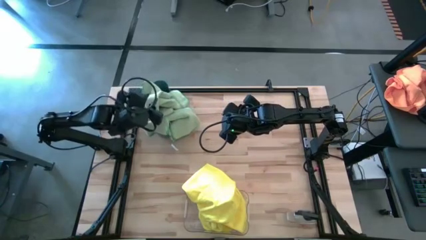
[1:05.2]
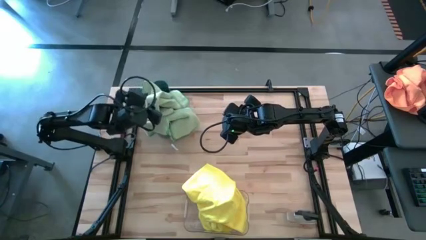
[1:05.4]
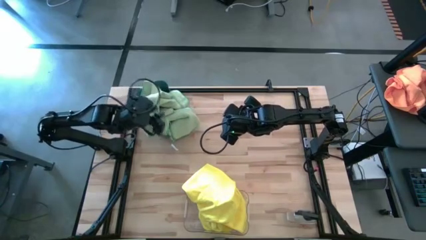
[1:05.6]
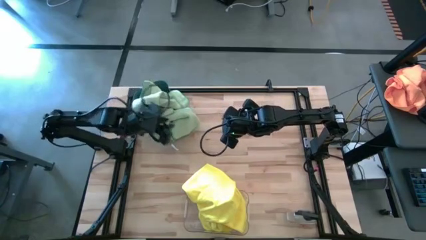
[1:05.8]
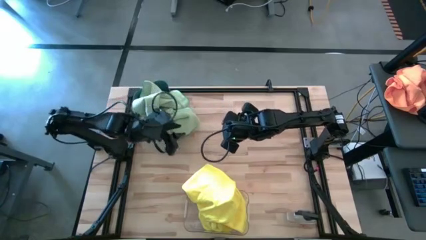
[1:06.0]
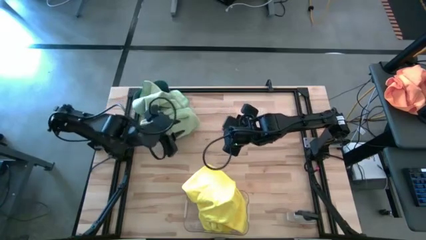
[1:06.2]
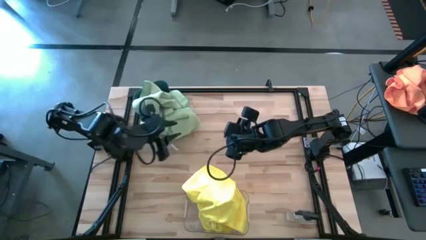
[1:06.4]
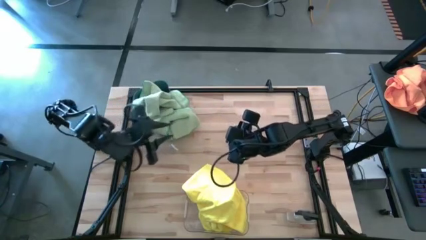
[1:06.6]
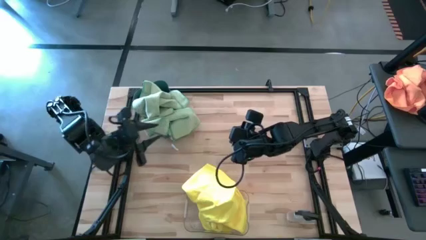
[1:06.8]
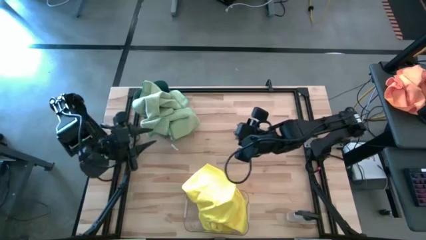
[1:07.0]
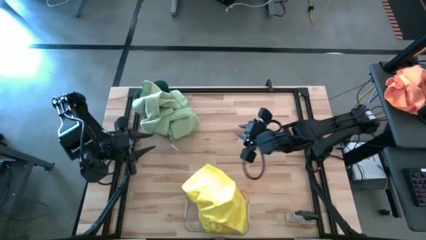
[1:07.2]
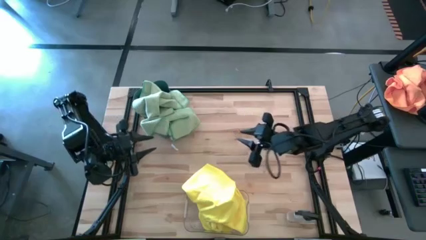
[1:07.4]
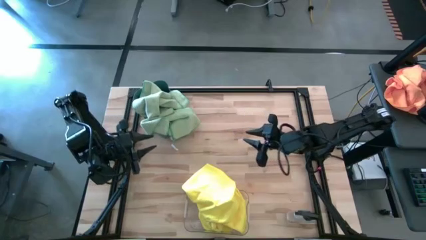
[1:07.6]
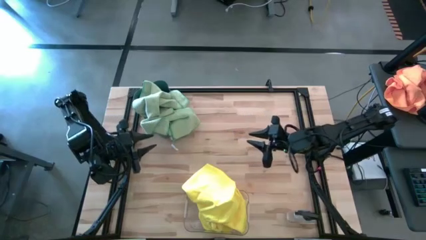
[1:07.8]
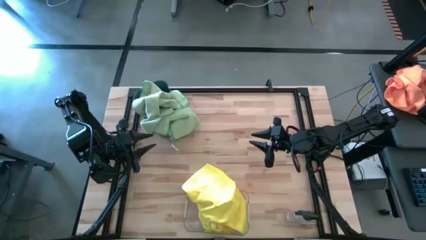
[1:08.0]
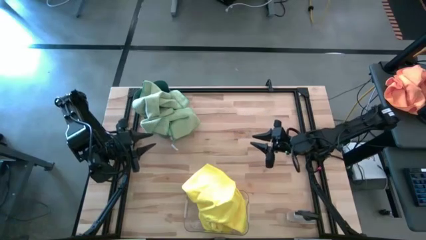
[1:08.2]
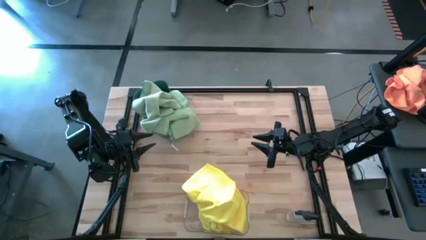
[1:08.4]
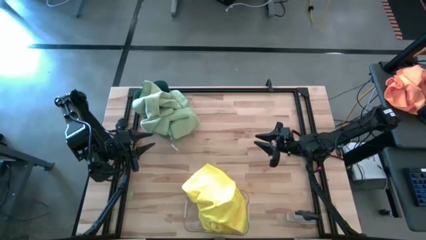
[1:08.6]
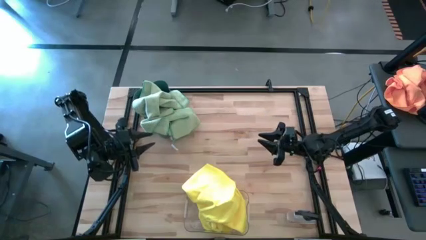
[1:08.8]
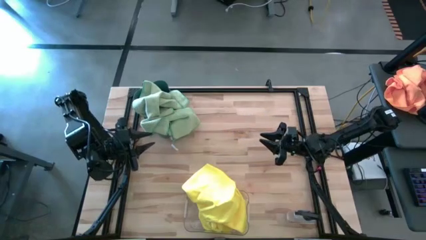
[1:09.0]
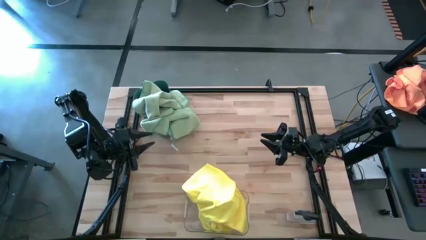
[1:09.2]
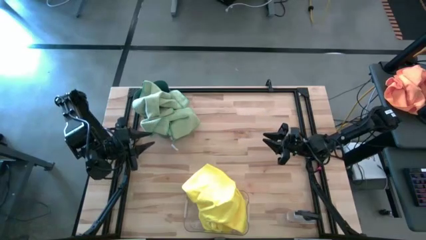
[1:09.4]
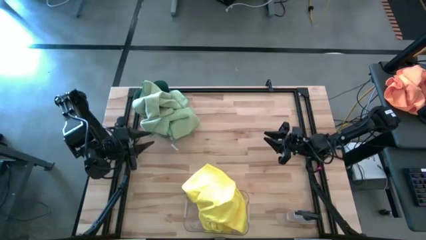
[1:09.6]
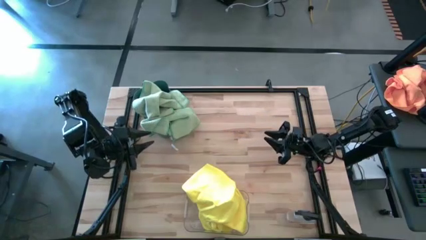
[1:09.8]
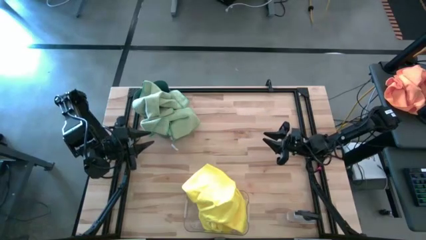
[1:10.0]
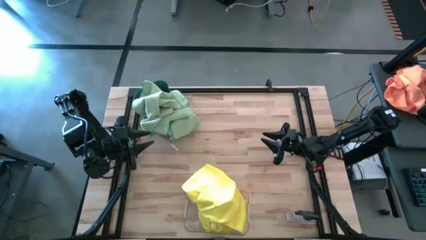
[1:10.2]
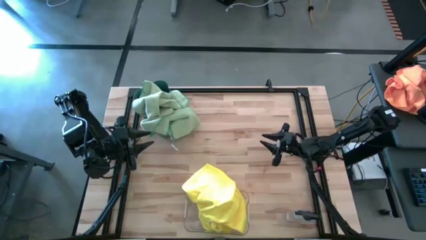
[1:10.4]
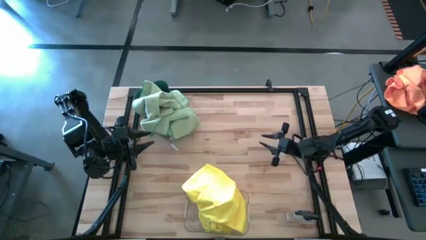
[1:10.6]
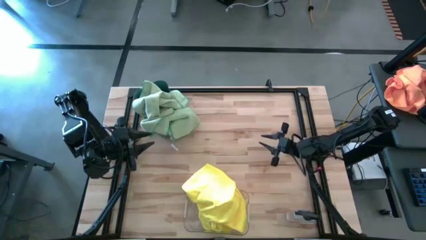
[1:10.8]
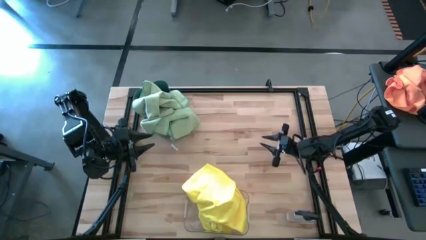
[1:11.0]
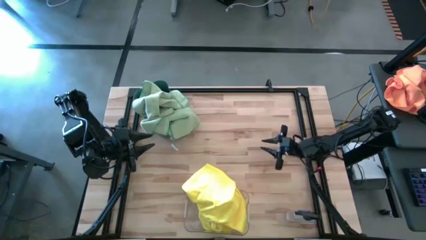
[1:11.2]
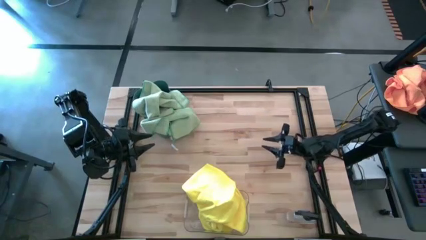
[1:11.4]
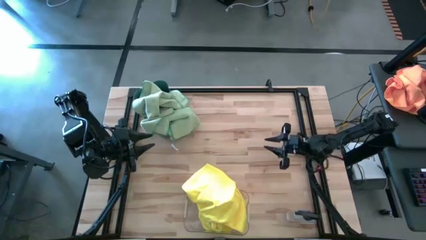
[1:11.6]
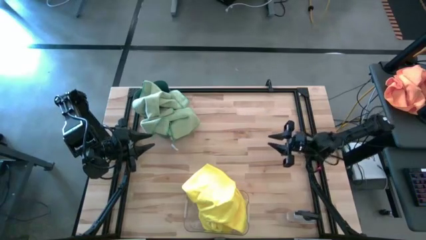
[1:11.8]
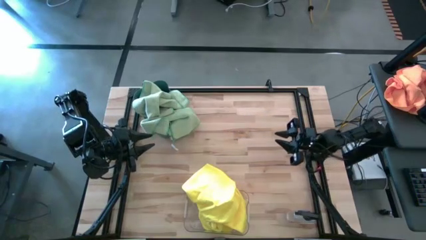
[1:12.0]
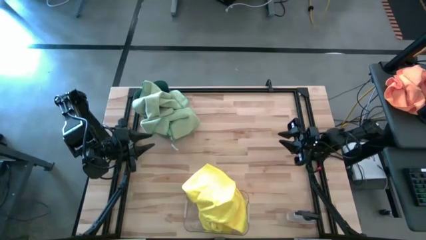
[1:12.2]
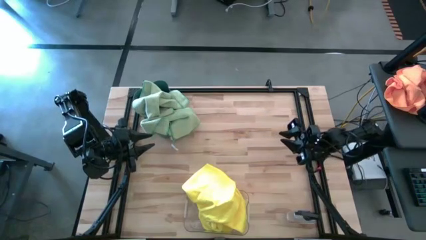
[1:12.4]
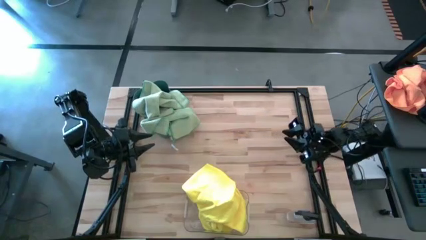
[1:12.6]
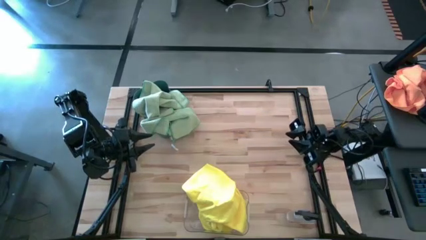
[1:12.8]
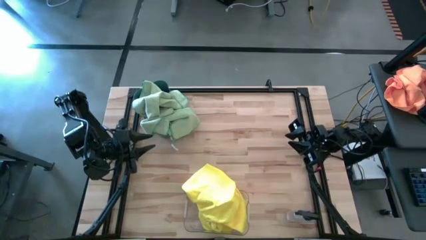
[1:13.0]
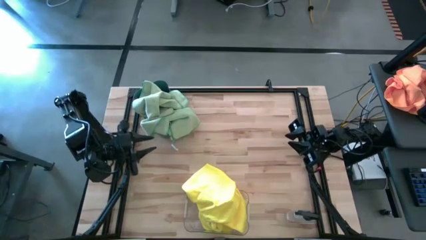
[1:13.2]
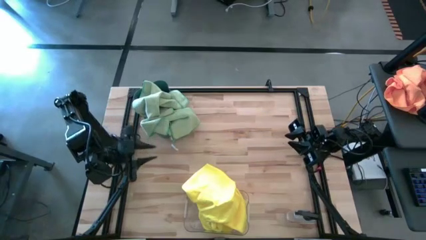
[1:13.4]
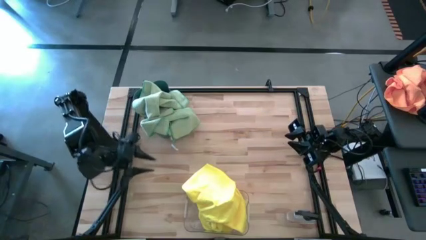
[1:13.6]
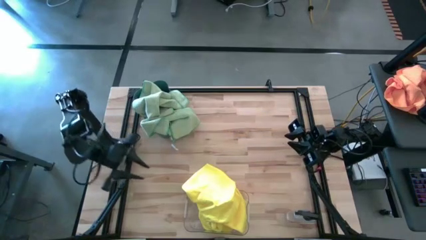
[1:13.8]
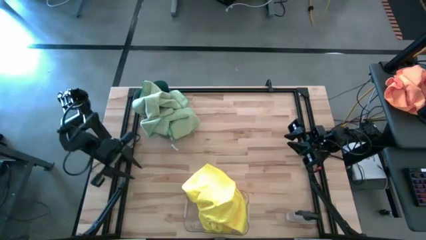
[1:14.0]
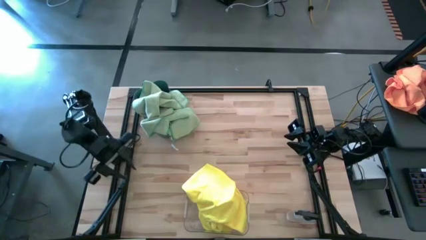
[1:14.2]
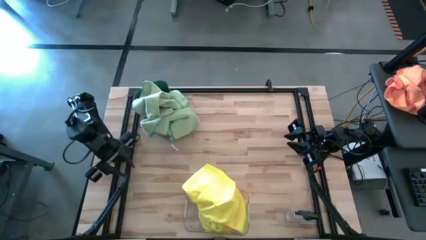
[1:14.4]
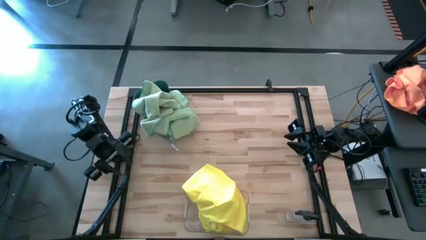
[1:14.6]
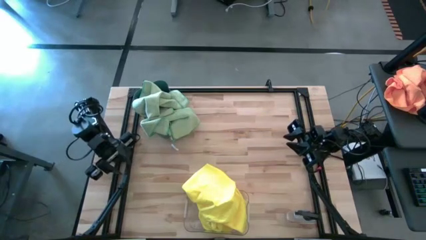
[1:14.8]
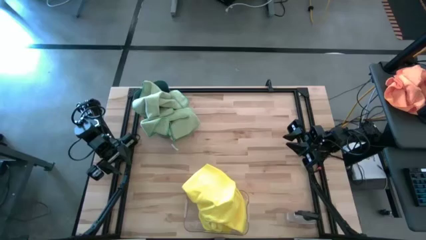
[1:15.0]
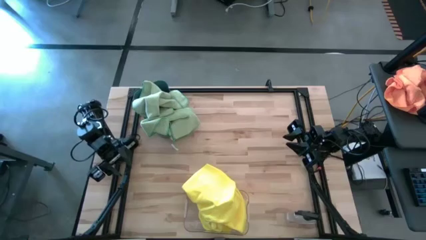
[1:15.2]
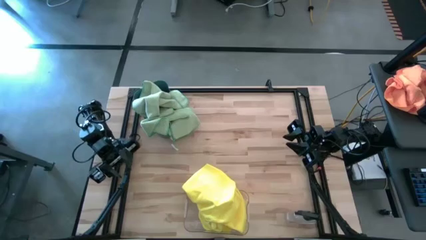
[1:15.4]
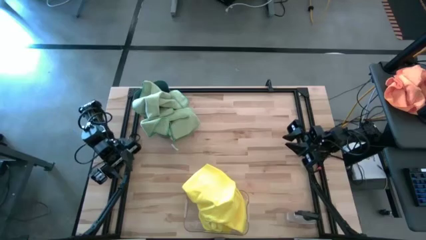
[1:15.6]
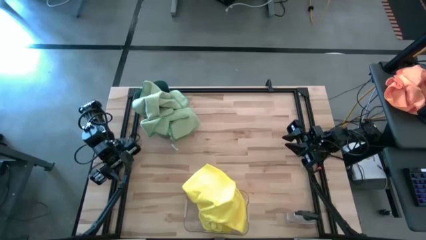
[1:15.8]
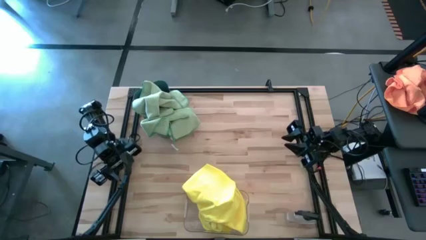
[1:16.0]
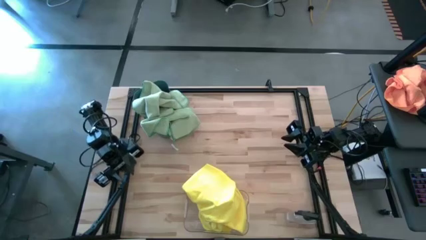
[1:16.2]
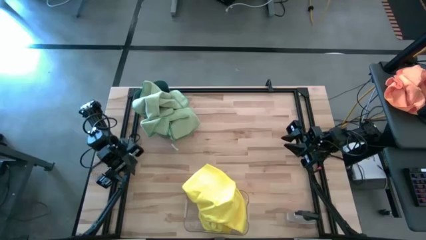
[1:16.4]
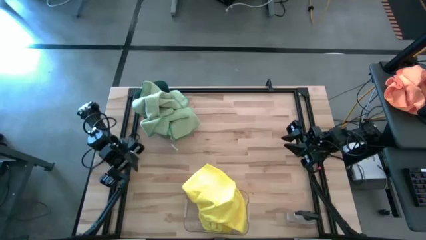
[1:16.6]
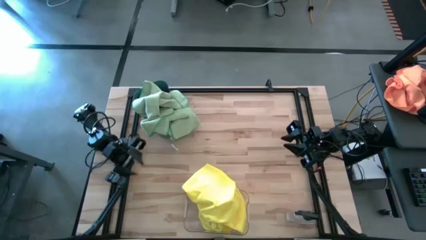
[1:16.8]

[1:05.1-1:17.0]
Task: Sort microfiber towel by color & place in baskets
Return to Home Position

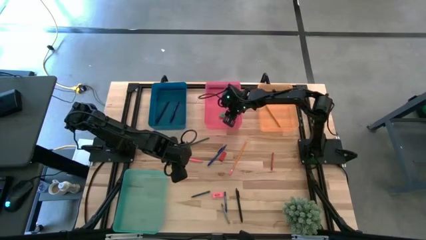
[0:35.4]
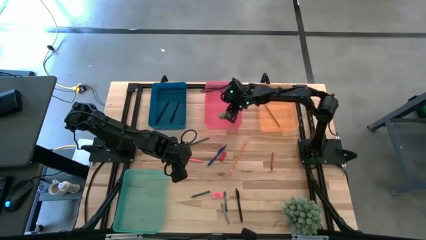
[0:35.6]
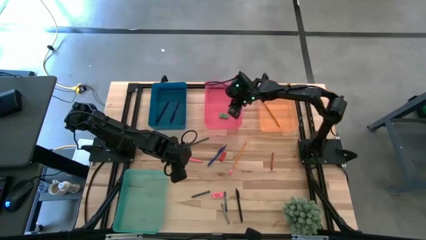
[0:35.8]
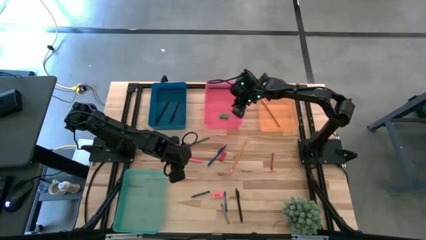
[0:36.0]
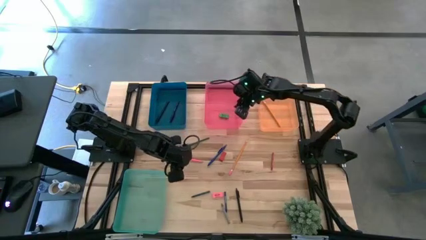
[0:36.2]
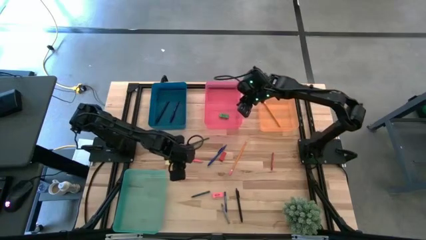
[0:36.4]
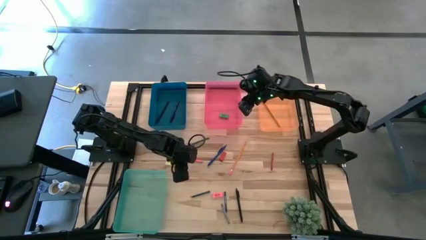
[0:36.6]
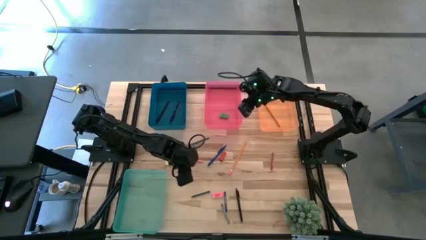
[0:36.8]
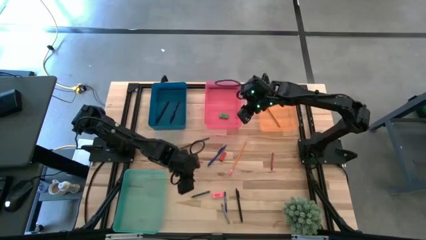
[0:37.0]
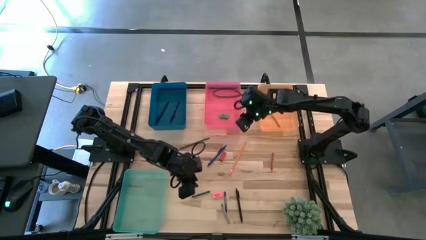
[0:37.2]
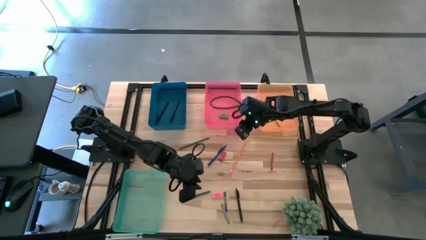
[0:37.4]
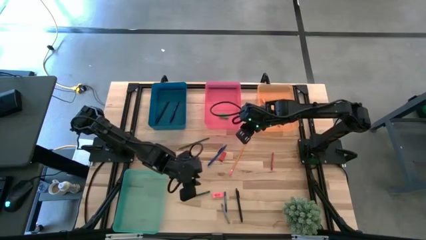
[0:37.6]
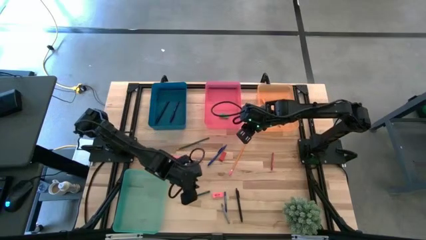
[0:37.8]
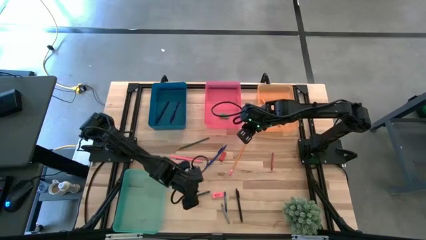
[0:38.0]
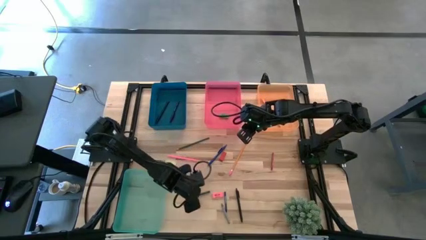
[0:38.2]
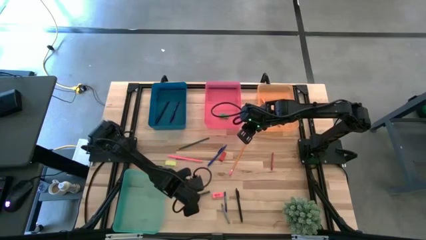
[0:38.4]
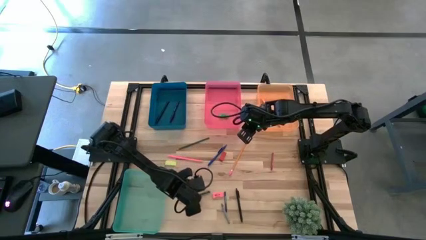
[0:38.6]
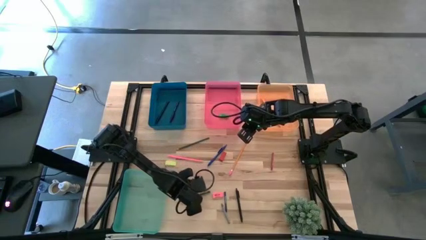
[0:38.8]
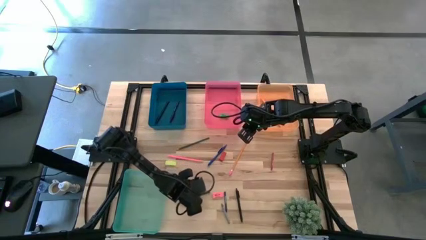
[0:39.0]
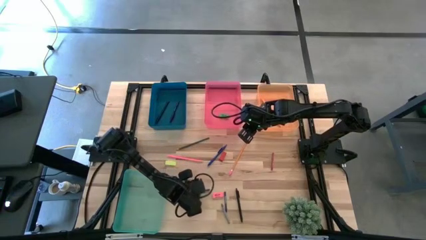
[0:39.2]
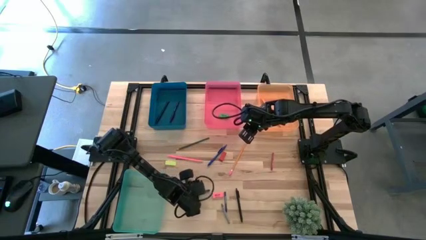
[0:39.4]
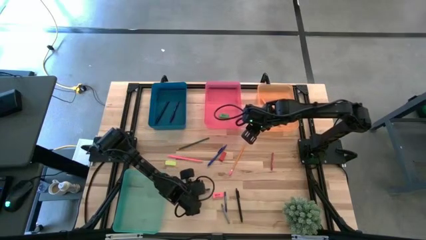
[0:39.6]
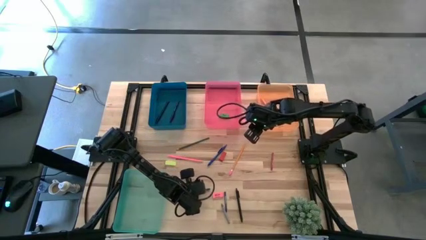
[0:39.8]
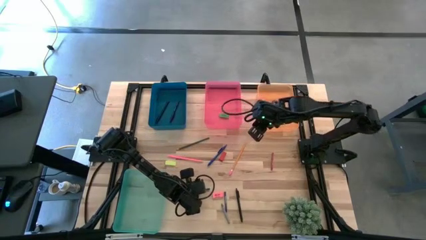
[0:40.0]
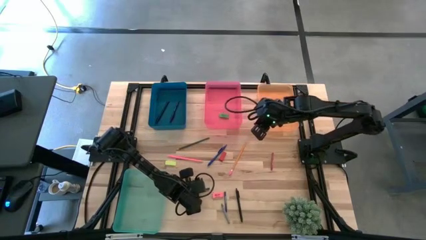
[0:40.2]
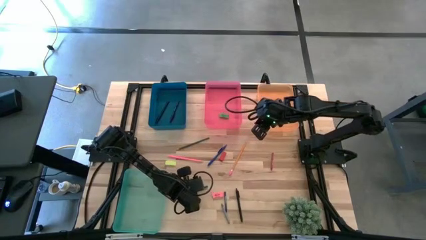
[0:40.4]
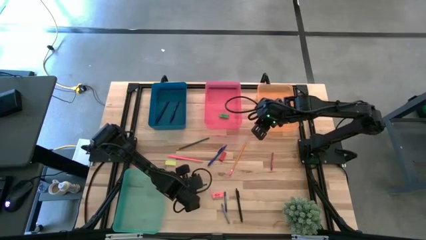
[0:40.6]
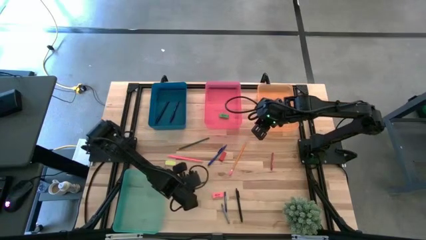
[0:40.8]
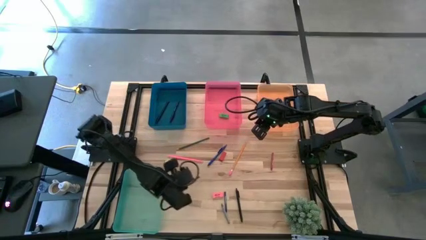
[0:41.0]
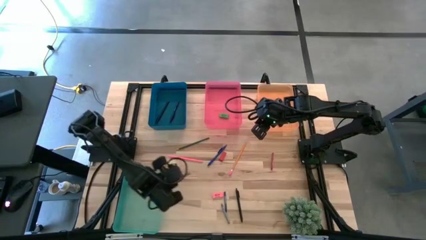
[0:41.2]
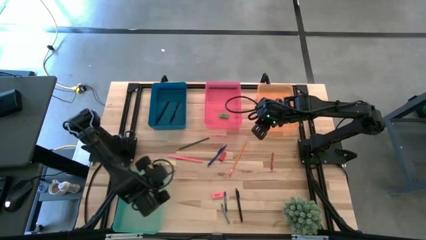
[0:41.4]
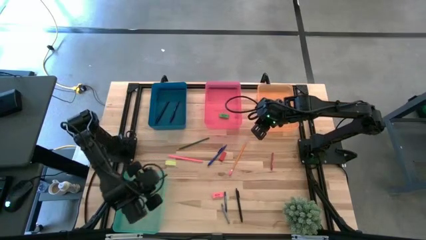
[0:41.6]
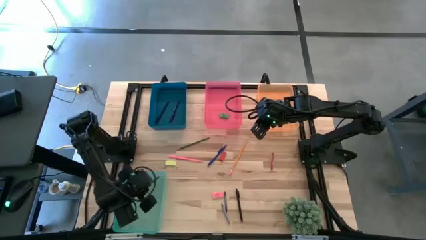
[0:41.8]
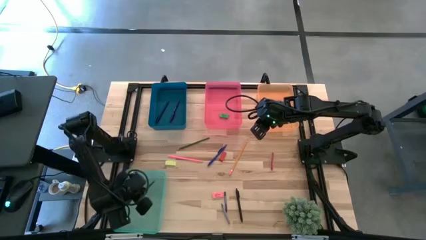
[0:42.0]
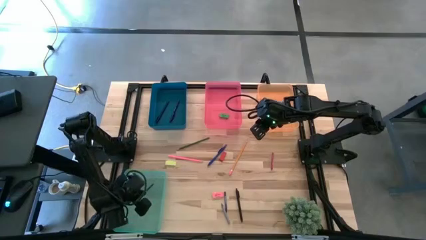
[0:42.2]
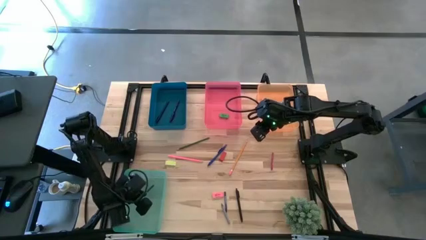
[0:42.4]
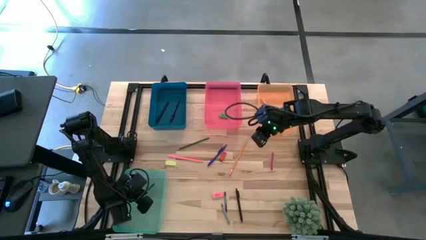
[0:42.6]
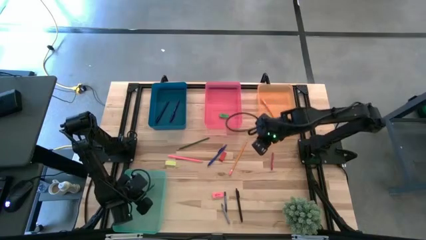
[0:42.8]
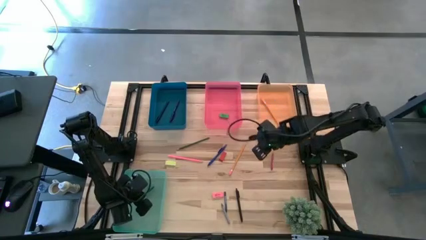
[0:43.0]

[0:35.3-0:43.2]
Task: Sort crayons/erasers/pens/pencils in bins
Put the green crayon into the green bin
